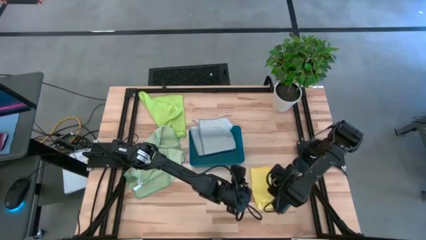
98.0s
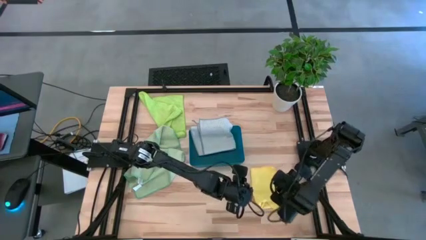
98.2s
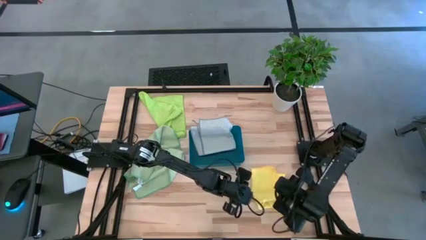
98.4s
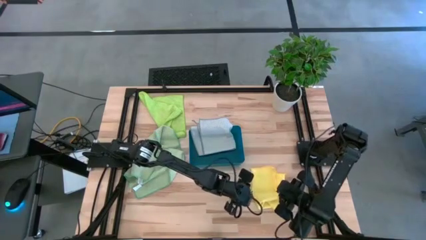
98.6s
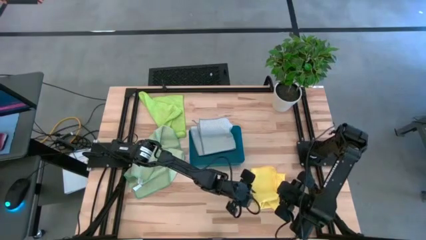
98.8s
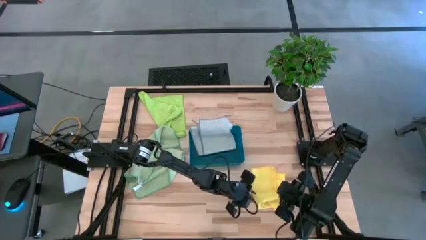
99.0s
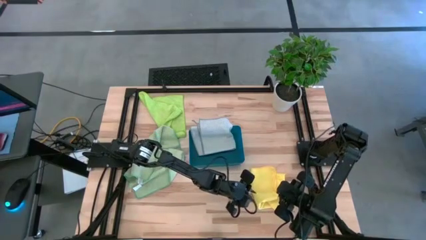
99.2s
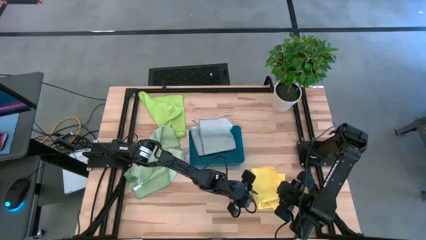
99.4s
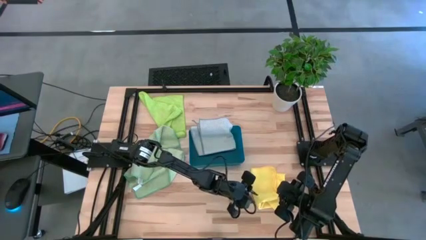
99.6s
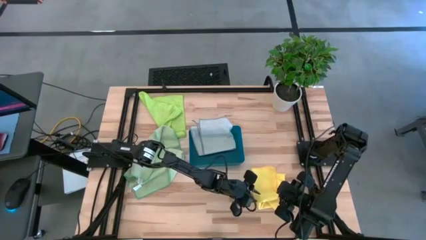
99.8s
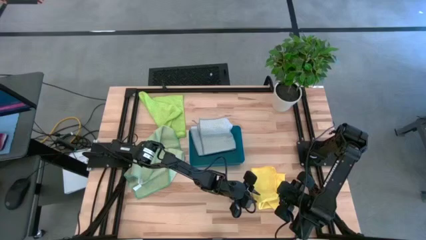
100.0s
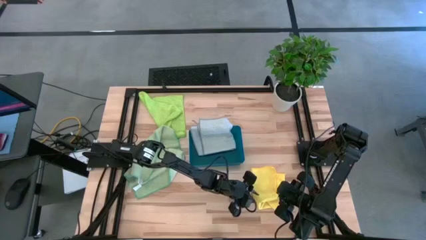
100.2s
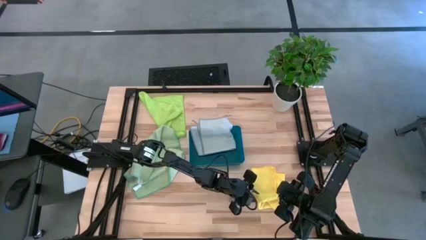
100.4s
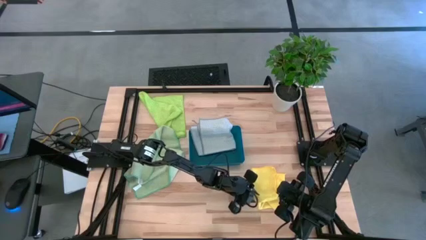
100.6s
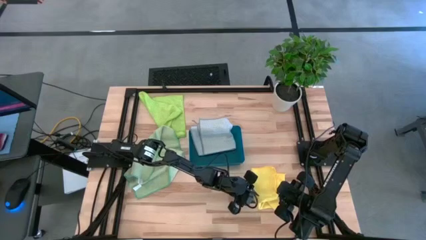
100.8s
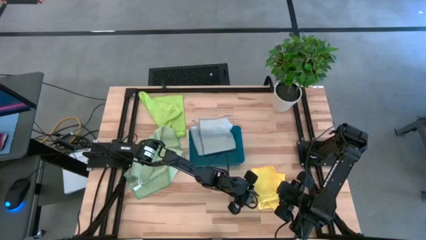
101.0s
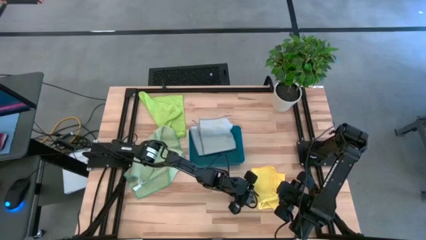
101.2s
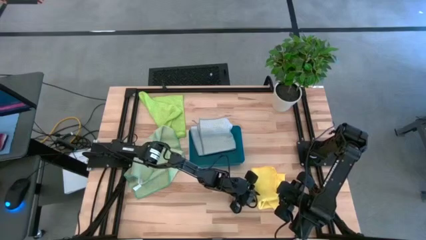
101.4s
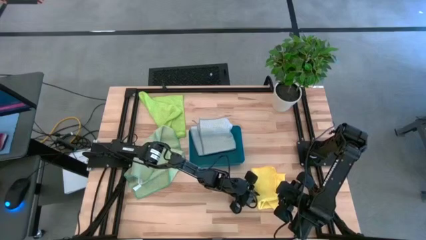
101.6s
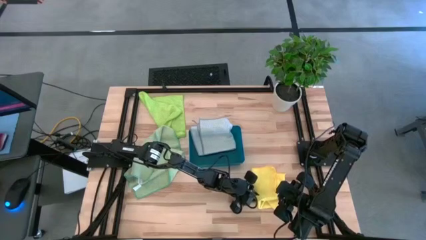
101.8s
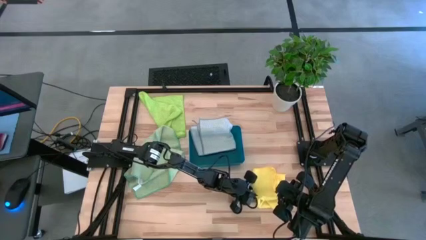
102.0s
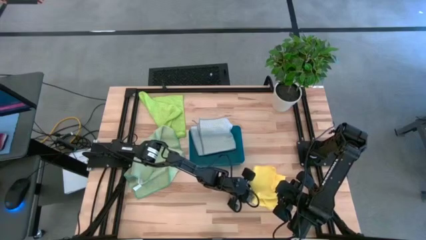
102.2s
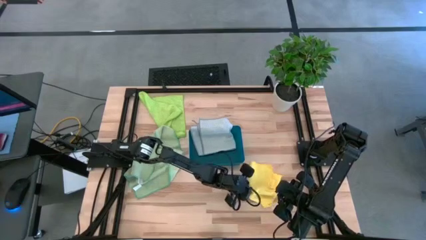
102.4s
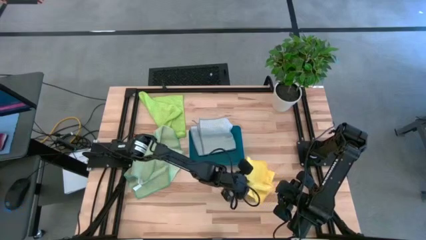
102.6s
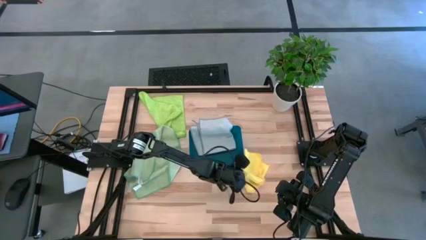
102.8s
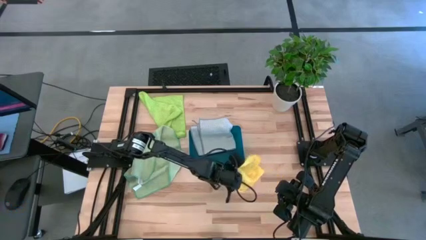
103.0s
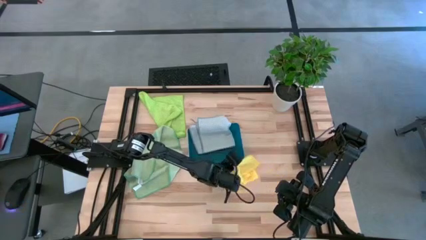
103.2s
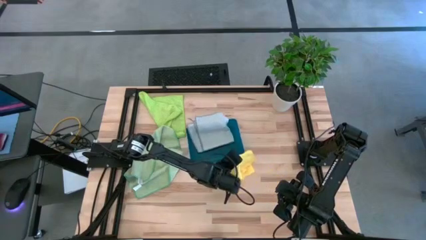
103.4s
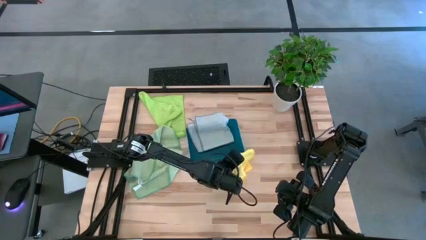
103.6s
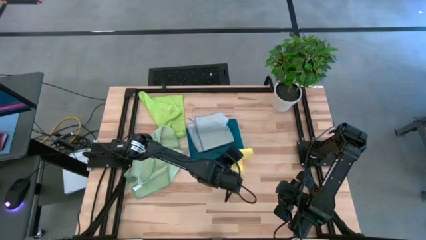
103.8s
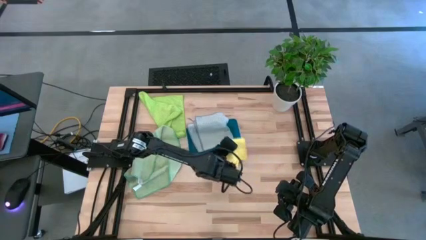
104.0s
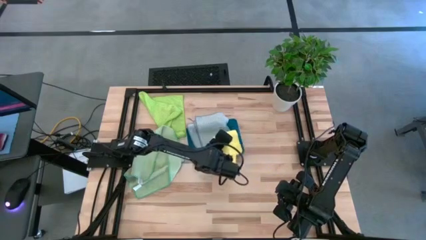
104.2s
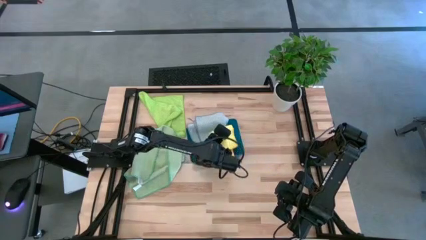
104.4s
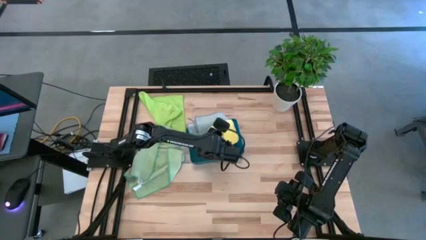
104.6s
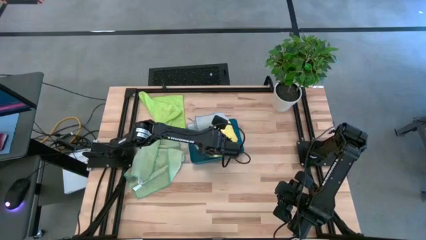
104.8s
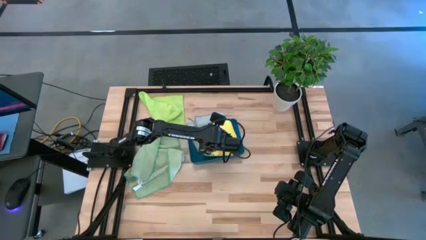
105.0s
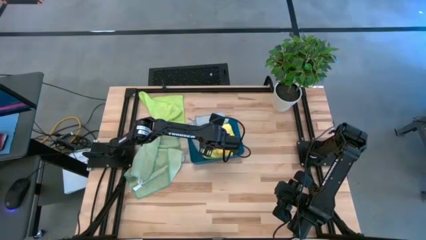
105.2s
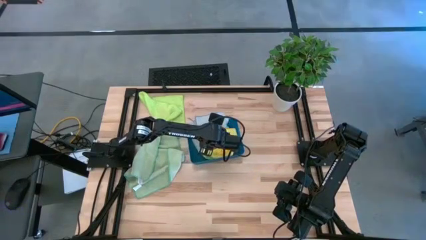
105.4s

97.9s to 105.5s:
Task: Fold microfiber towels
Put the folded yellow microfiber towel into the blue bin

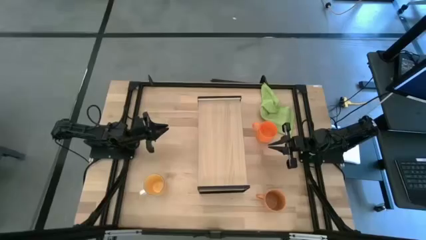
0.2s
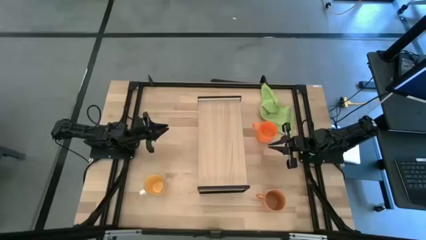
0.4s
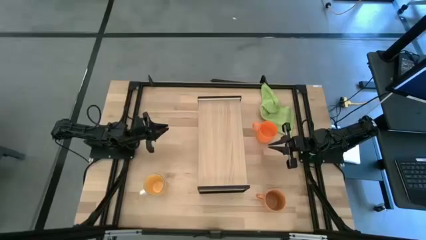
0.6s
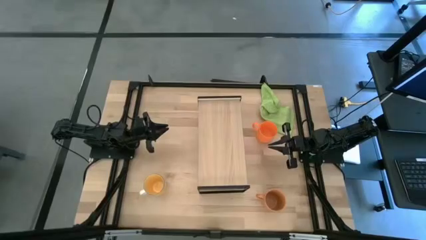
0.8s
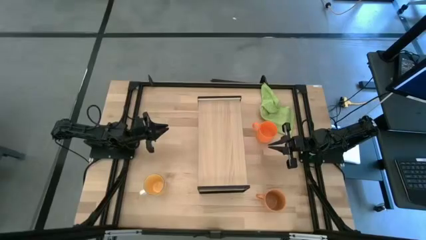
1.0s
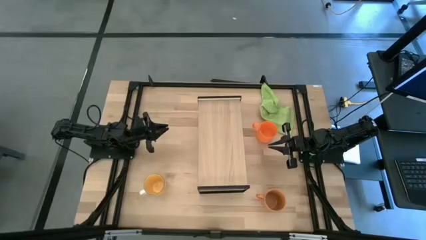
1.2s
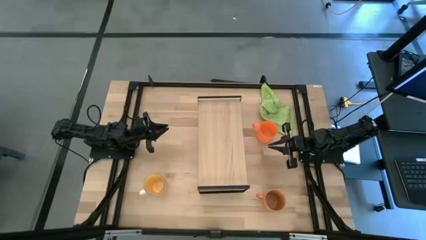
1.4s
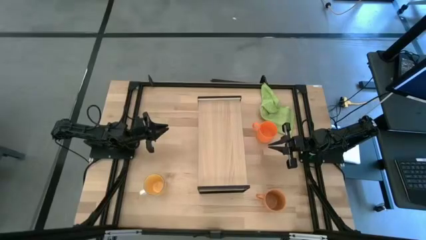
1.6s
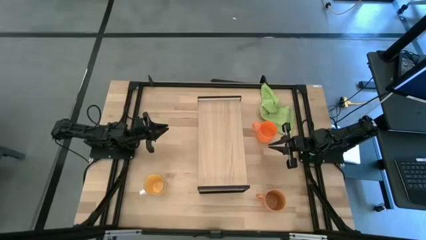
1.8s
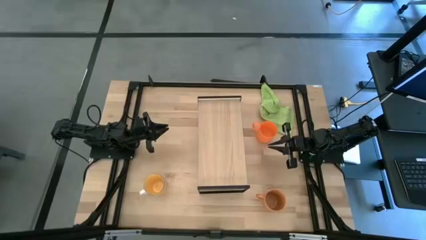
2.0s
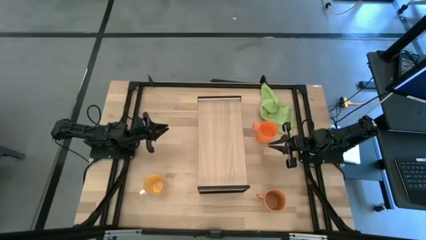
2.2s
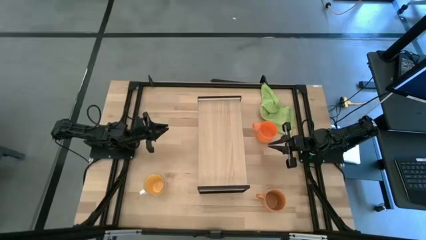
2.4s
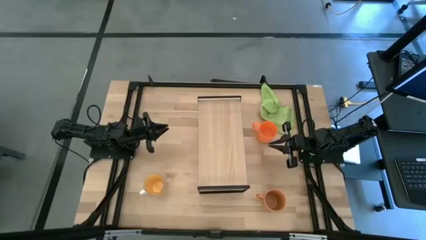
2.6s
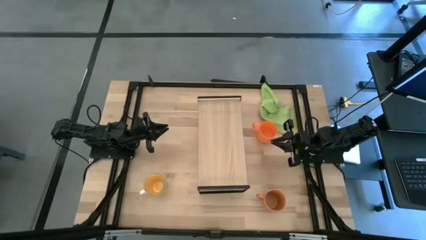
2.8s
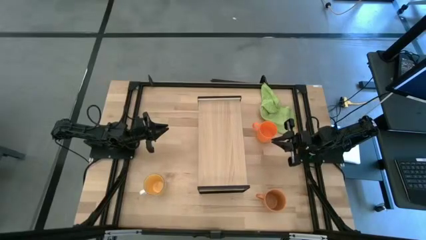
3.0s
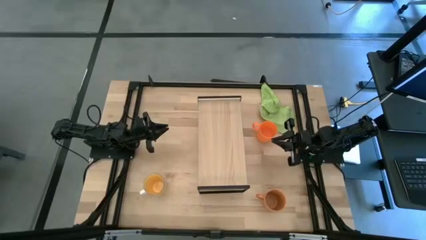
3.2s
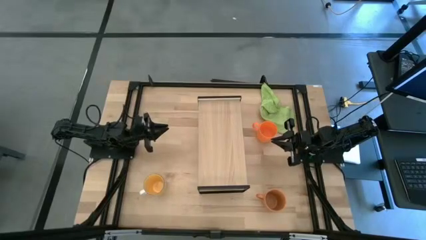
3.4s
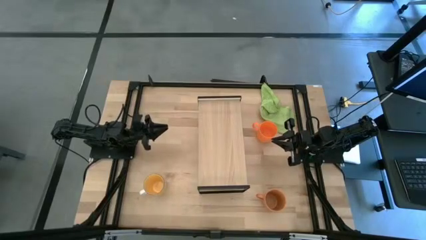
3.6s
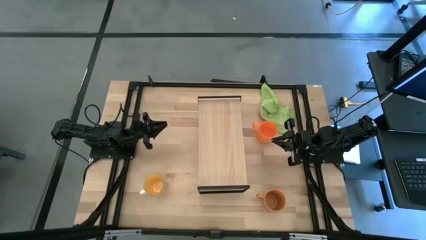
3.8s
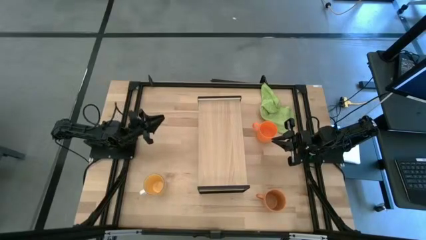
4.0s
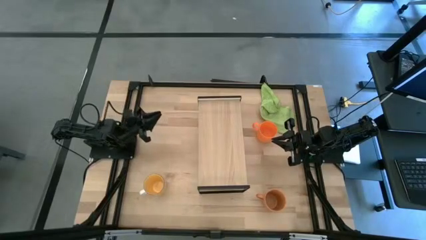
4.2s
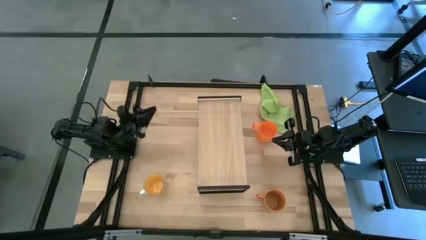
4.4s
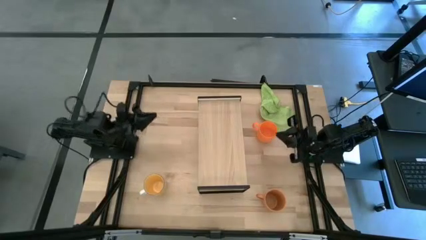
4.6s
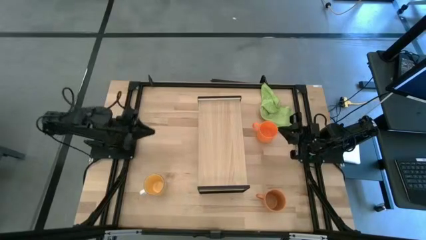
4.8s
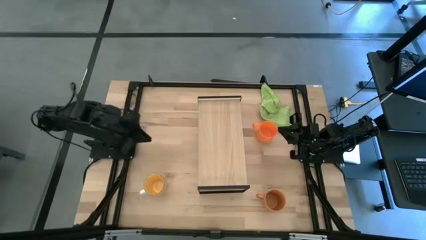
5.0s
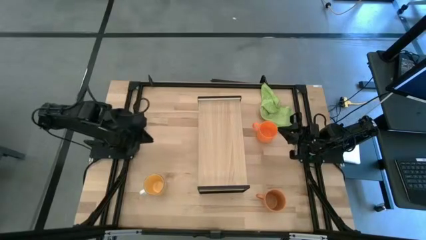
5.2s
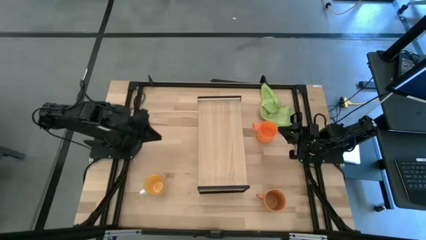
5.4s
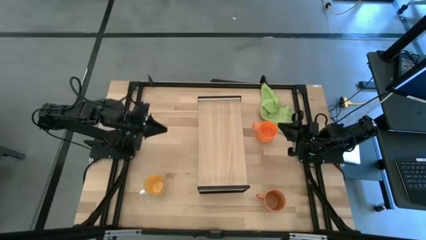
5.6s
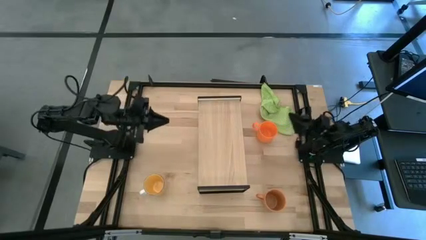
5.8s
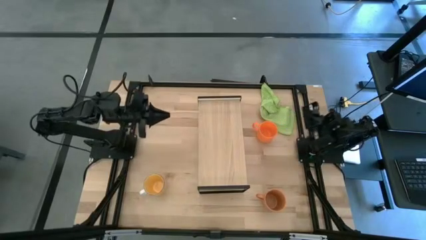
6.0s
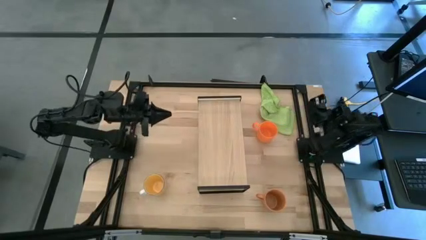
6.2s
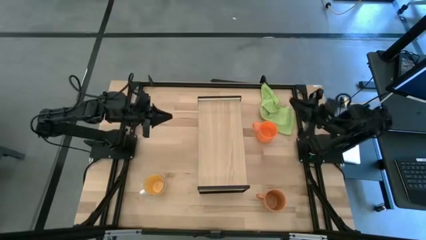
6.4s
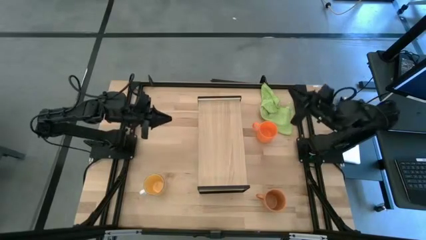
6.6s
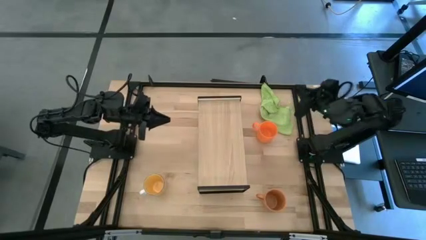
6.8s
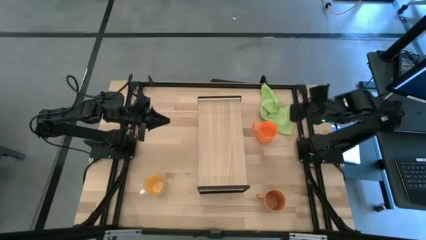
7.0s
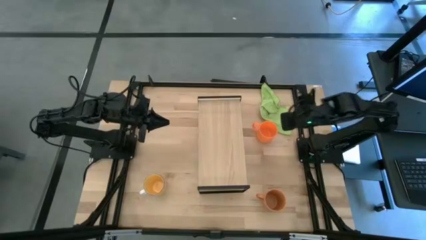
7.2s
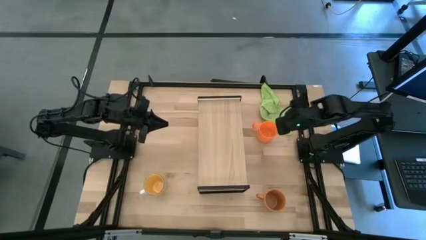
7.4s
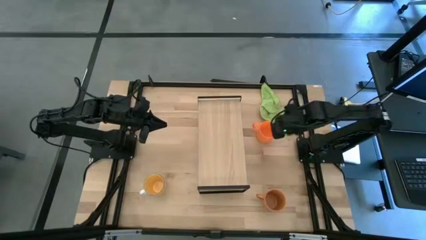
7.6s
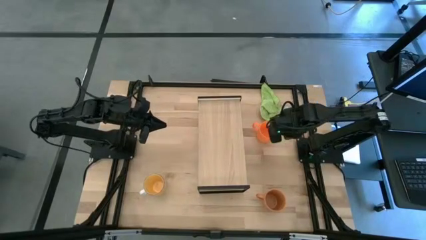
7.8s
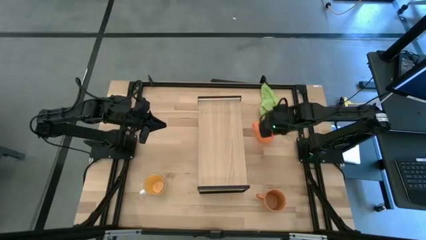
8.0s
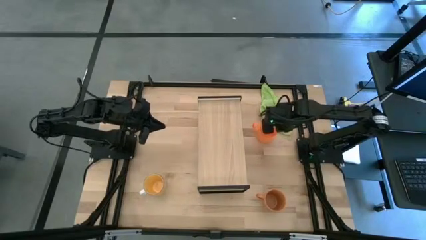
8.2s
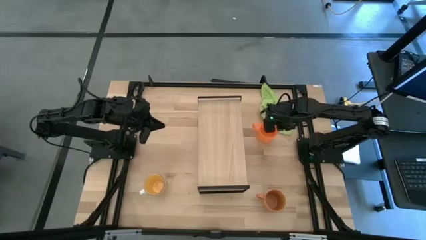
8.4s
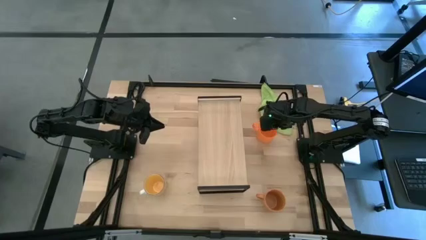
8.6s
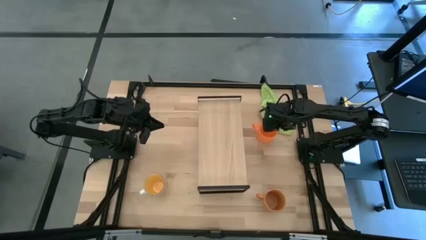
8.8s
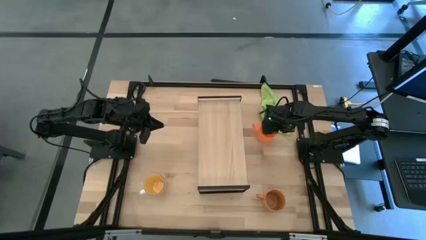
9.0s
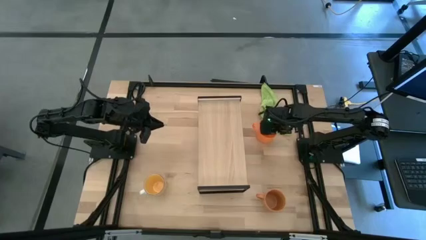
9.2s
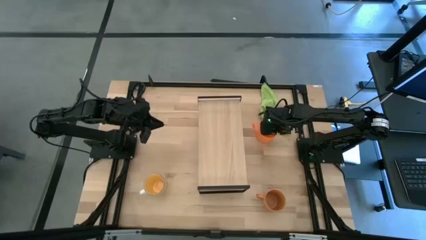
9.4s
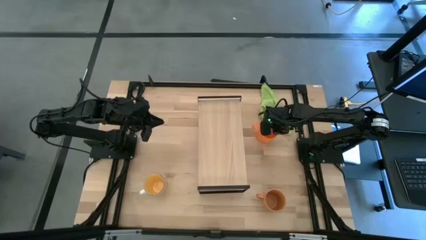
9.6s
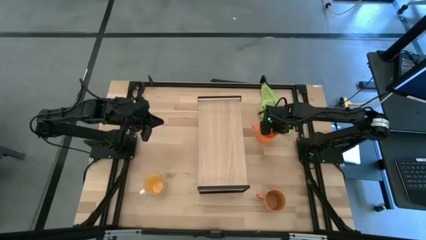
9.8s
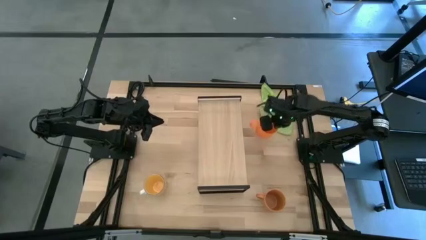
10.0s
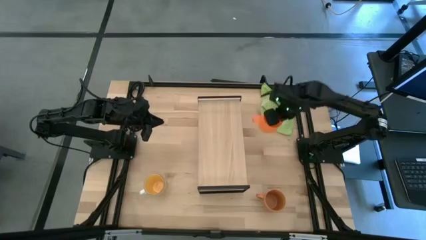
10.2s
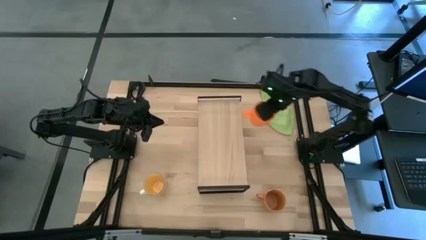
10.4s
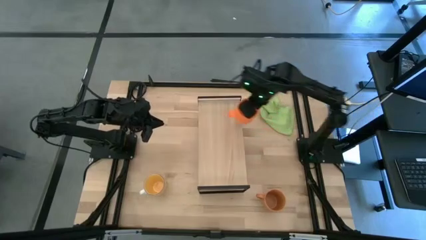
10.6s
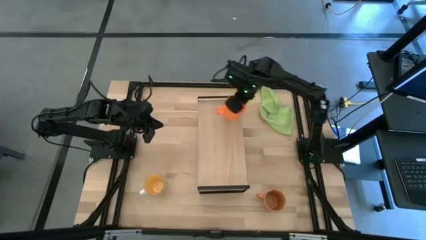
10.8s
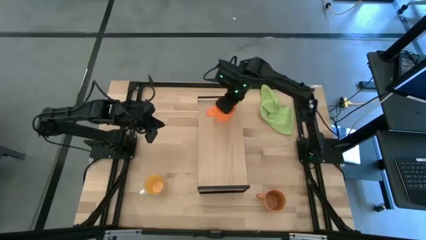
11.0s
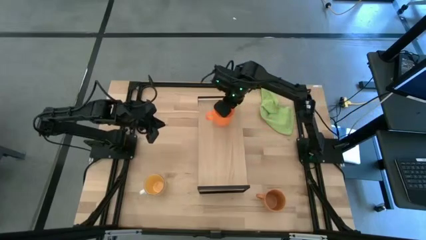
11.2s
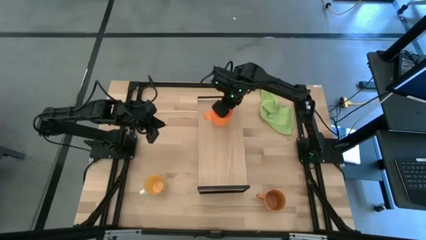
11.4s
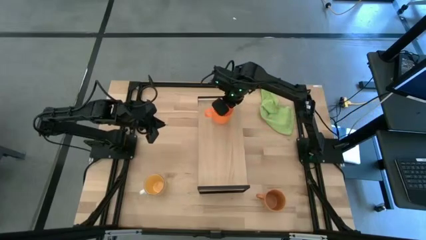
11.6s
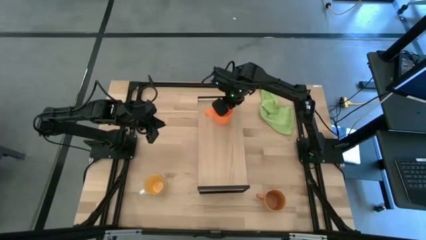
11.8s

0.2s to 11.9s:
Task: Stack small to large cups/mugs on shelf
Put the orange mug on the shelf
